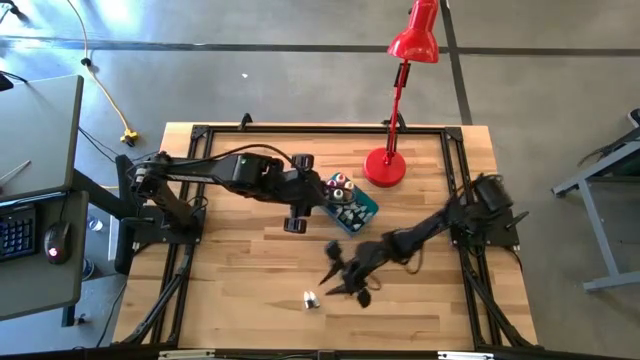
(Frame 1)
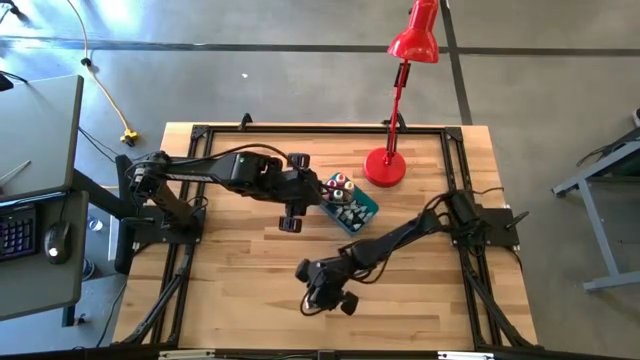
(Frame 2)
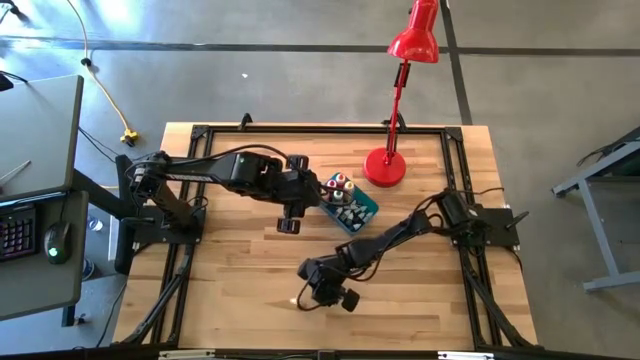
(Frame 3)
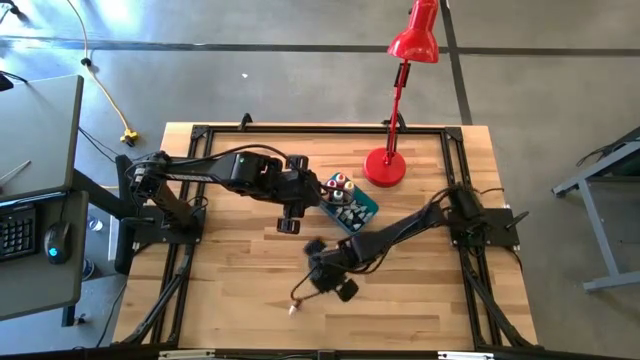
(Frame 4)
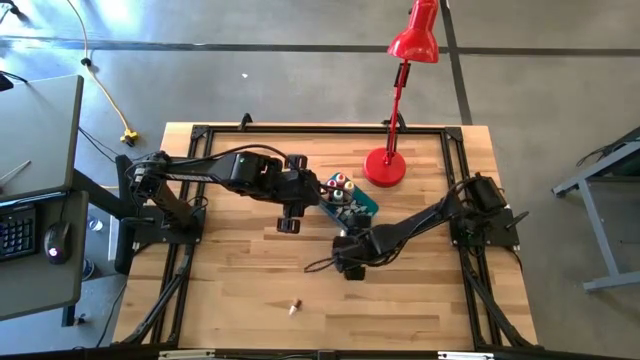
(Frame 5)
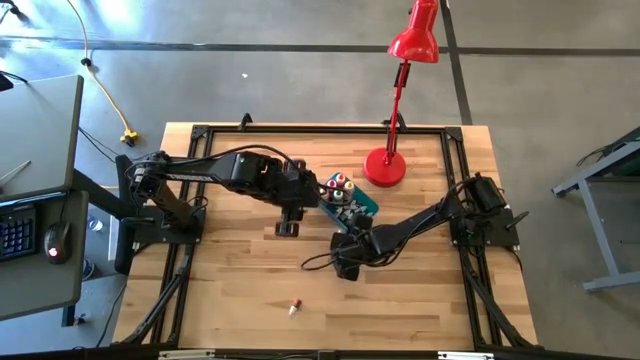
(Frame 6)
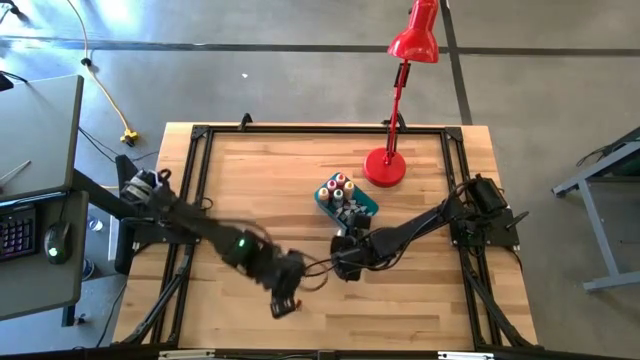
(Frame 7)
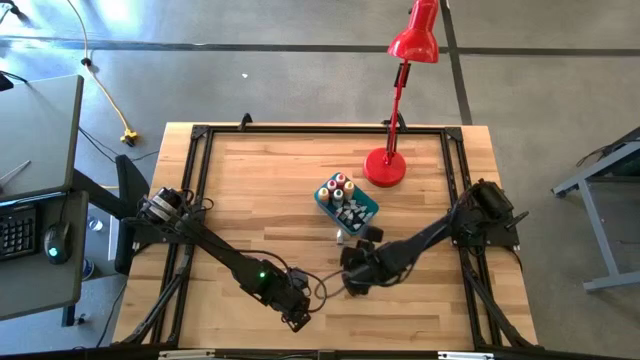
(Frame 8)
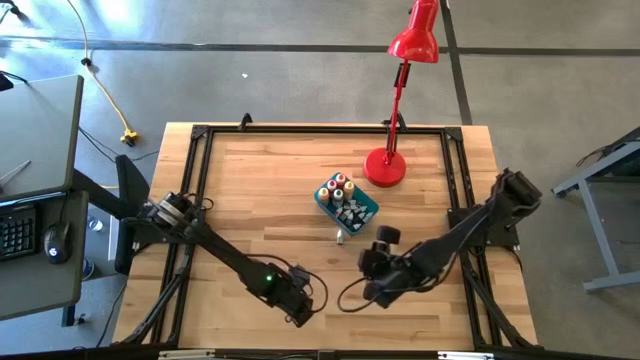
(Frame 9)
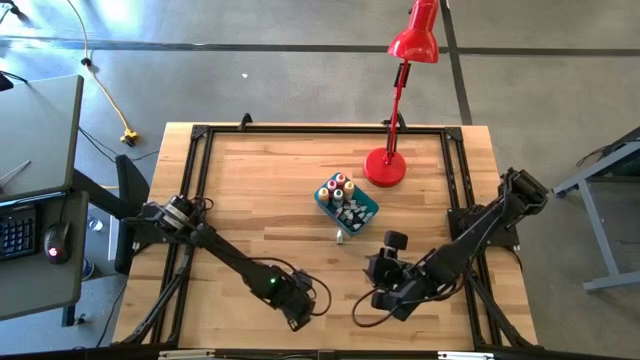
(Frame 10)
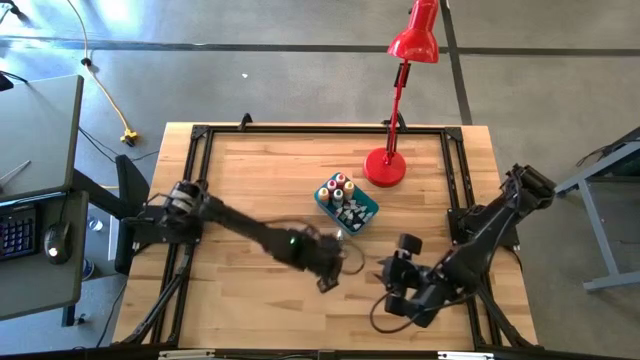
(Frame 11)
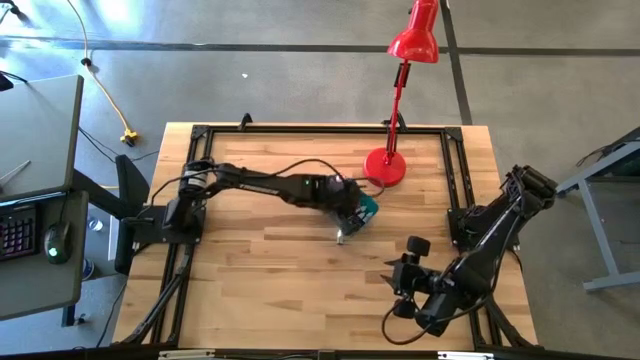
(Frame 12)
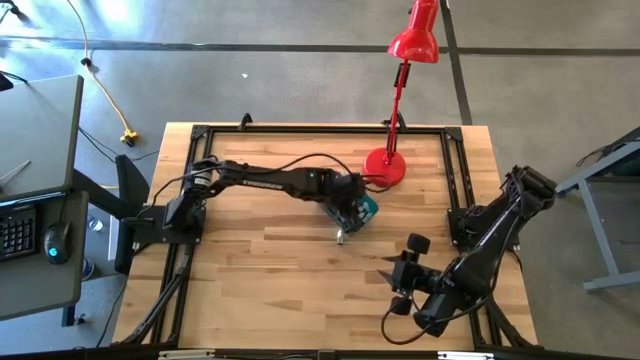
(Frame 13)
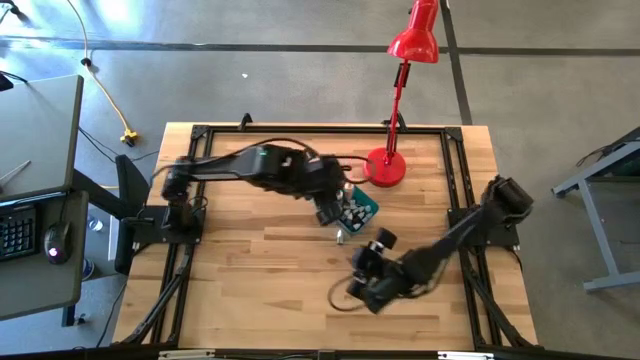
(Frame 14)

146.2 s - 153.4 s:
Task: Pick & Place food coloring
Put the small food coloring bottle into the blue container

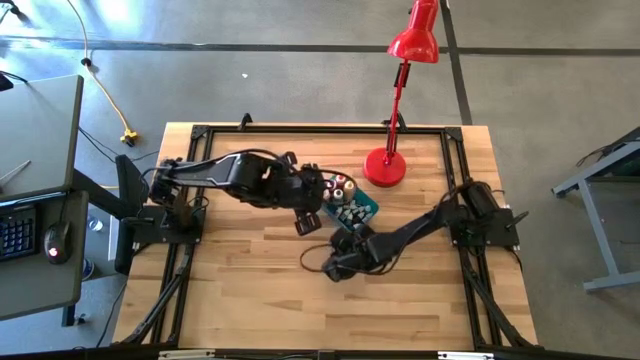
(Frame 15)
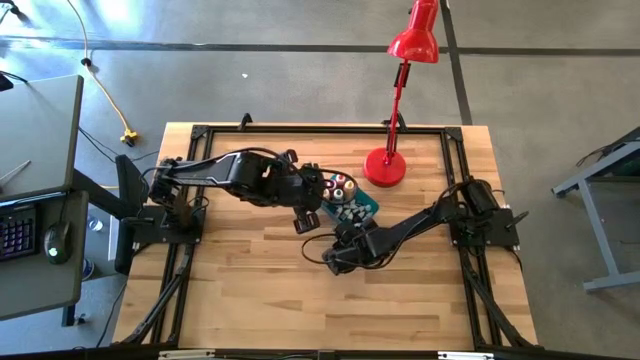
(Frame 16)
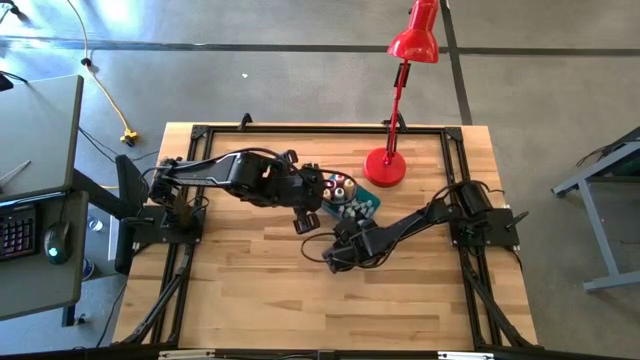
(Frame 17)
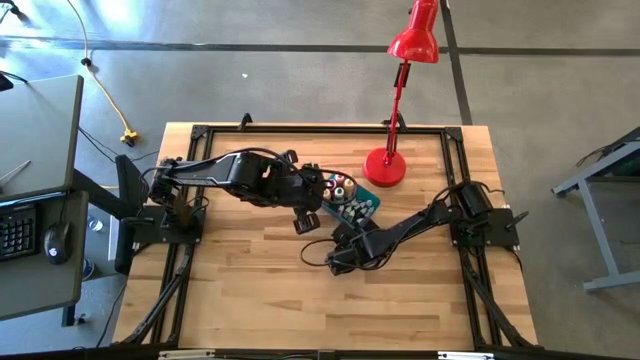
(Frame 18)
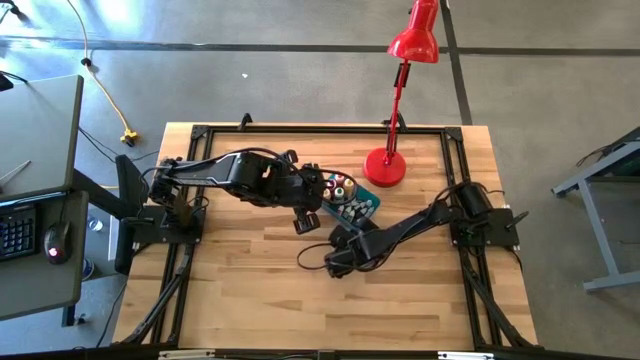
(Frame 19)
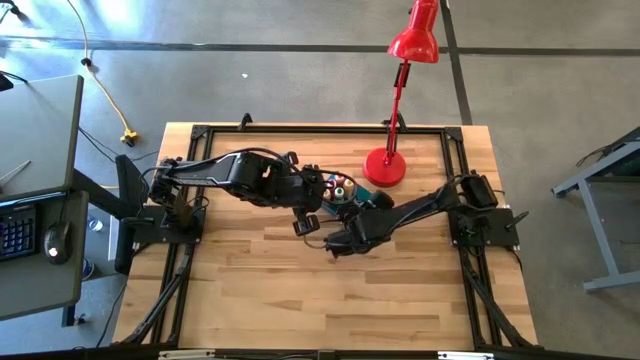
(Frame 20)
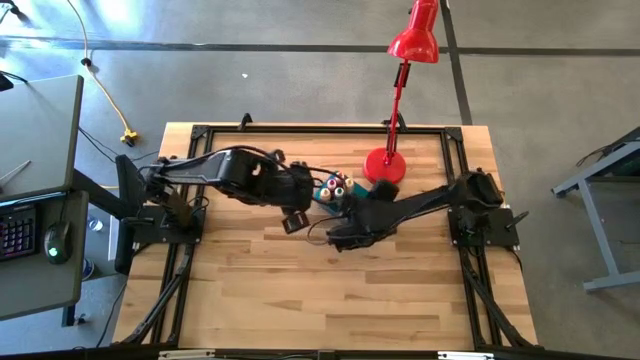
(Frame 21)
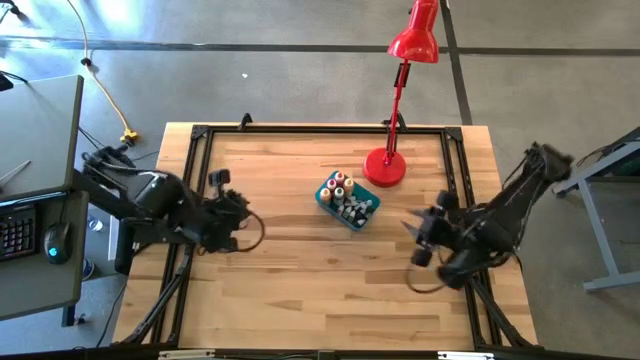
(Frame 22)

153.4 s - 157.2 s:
Put the small food coloring bottle into the blue container

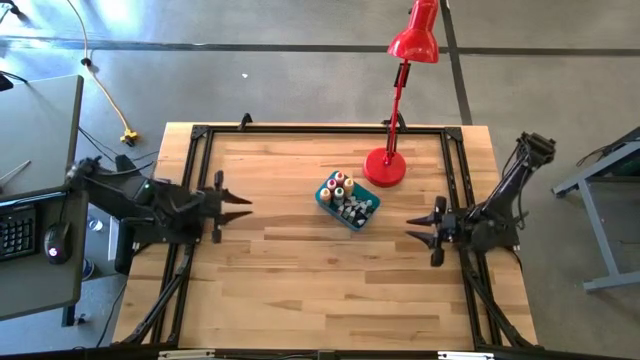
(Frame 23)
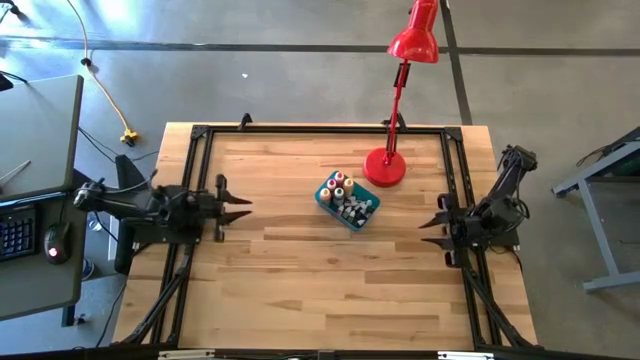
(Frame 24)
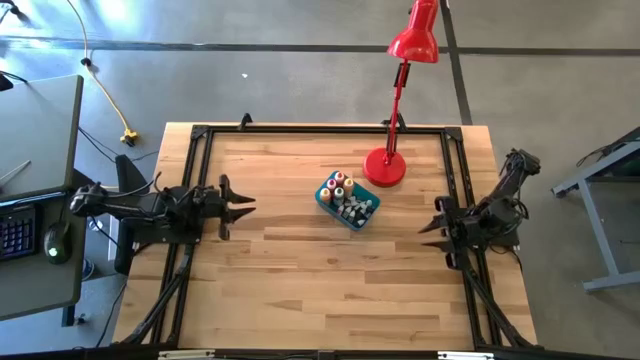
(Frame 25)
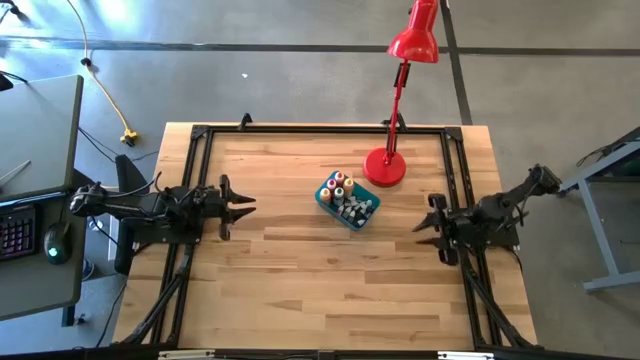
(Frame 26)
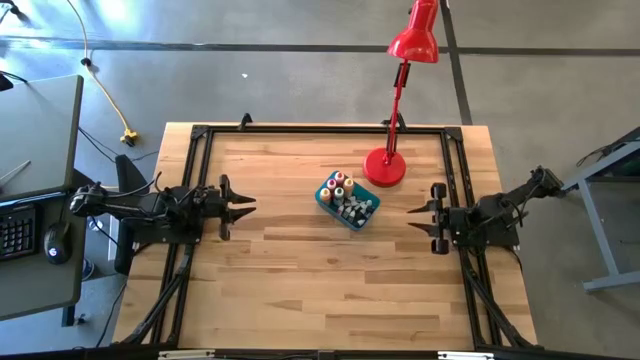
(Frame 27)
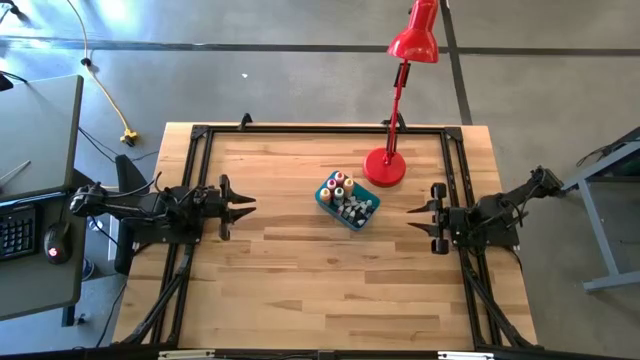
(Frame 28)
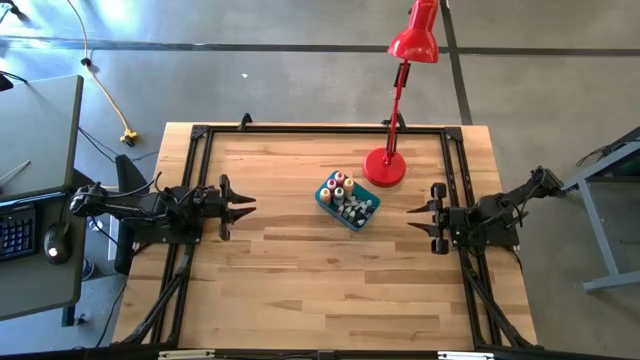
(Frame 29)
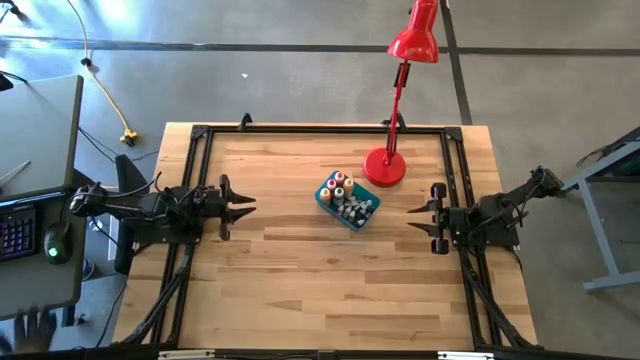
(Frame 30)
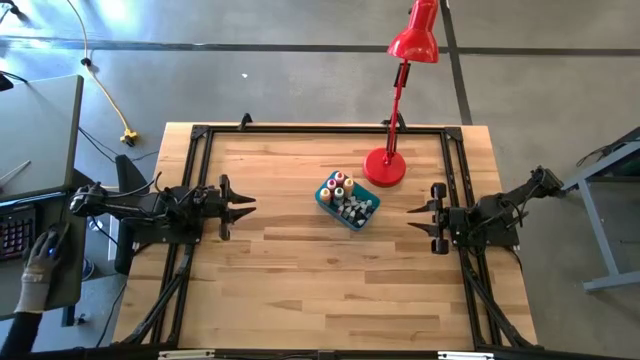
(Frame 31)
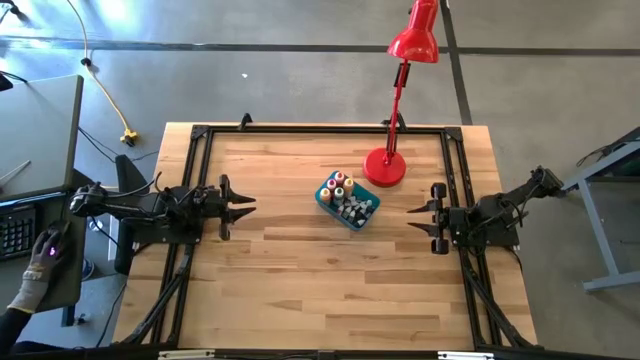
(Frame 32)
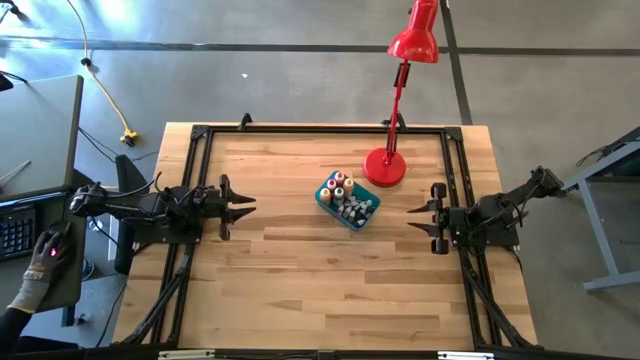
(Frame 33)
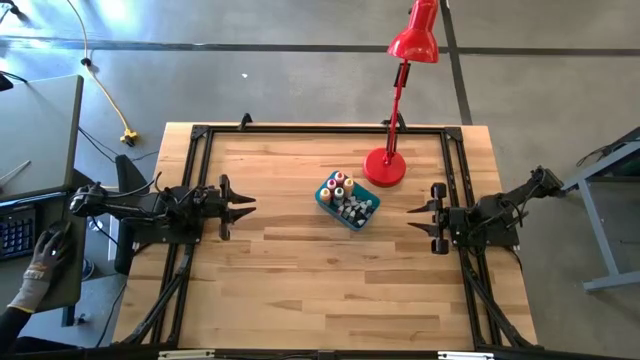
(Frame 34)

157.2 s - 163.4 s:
Return to home position

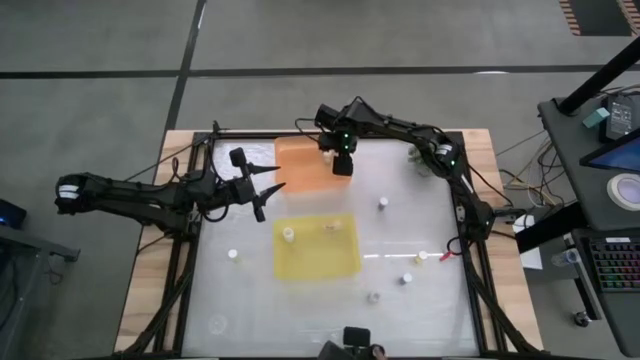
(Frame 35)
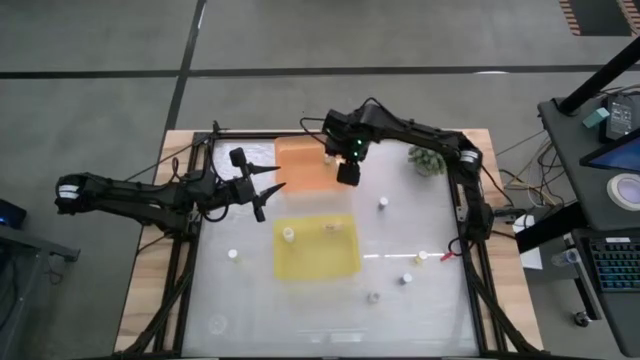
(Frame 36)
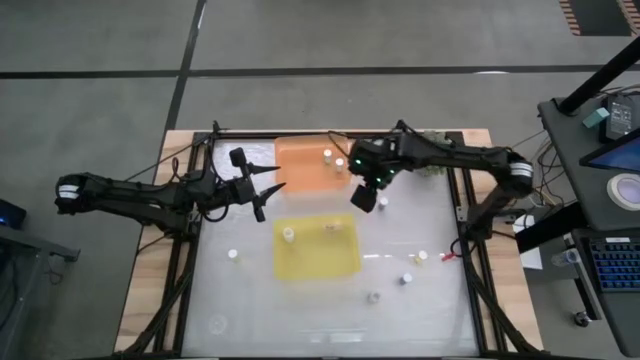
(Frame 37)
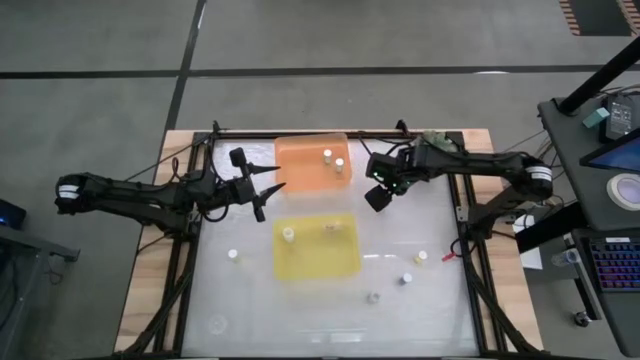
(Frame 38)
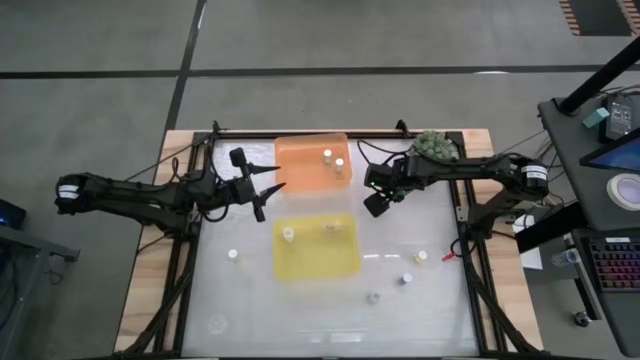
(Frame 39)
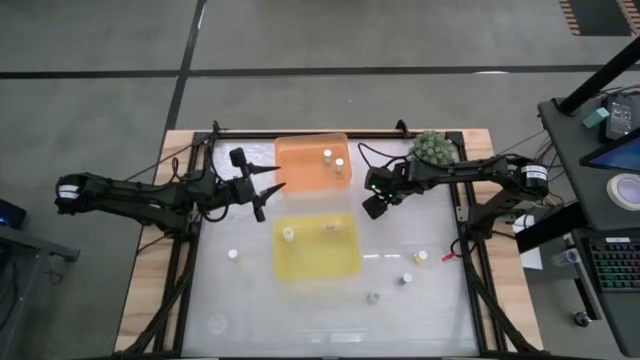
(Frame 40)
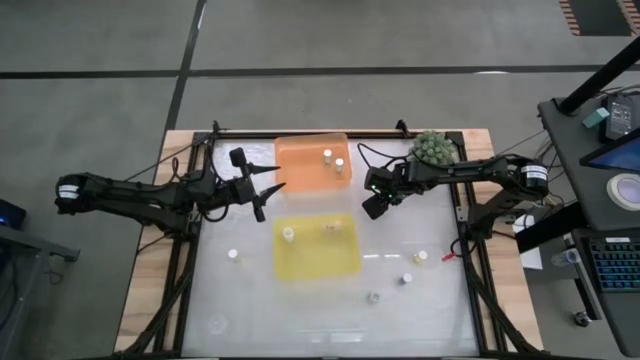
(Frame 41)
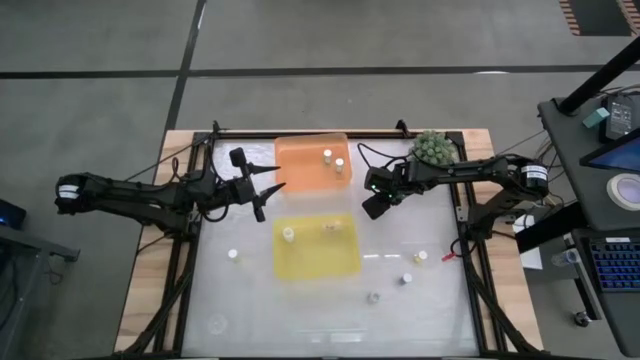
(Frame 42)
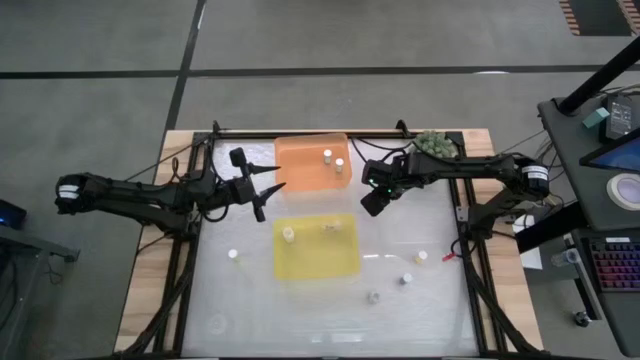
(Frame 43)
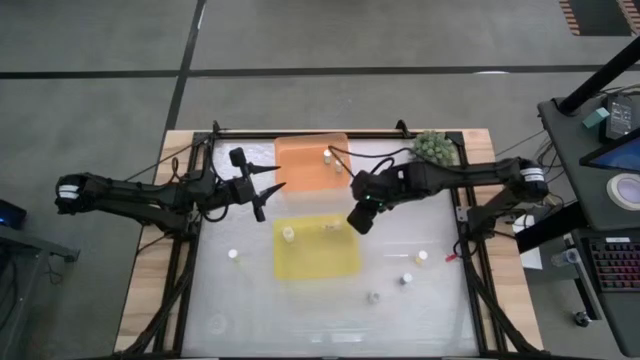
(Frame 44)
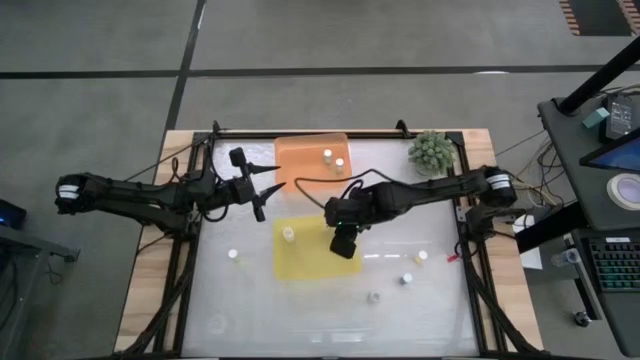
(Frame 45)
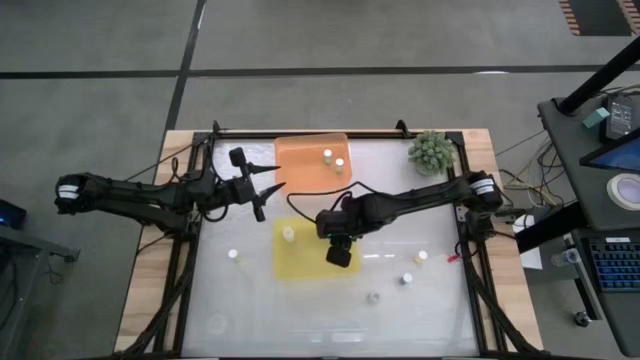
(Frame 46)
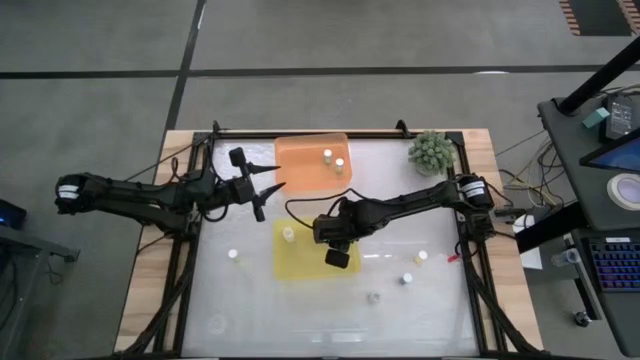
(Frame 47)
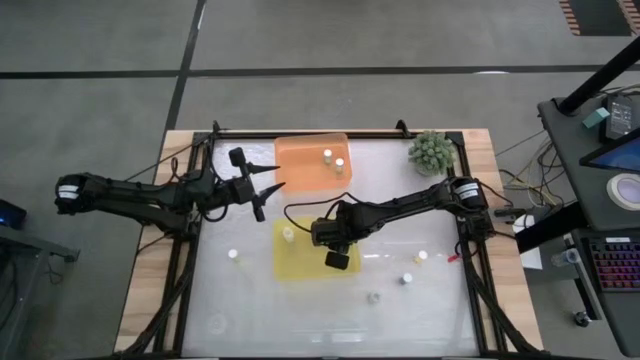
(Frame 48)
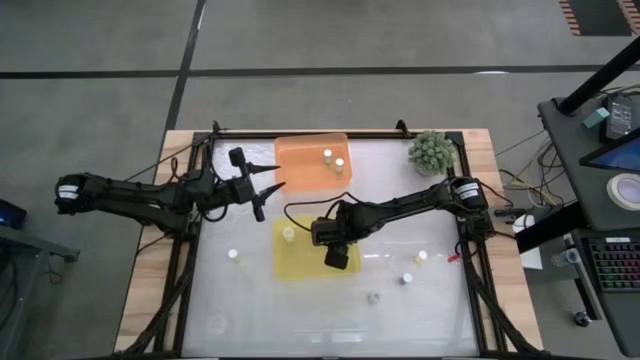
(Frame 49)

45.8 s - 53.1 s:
Task: Pick and place medicine bottles into bin by pill shape (circle, oval)
Put the top blue capsule bottle into the yellow bin
